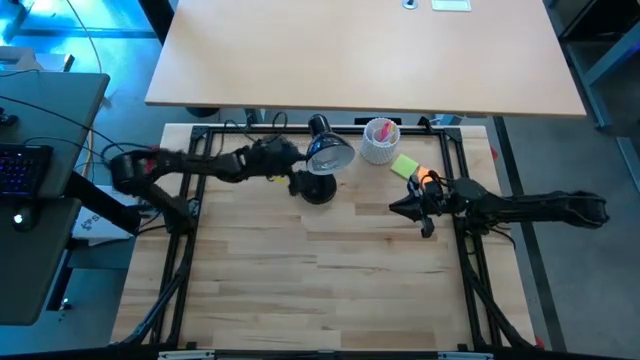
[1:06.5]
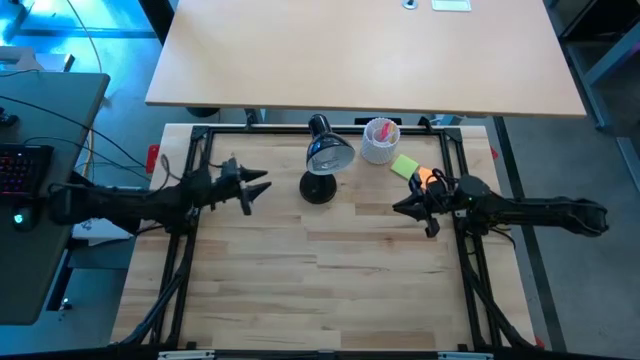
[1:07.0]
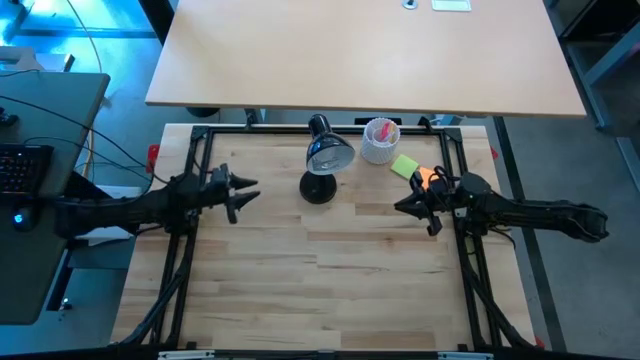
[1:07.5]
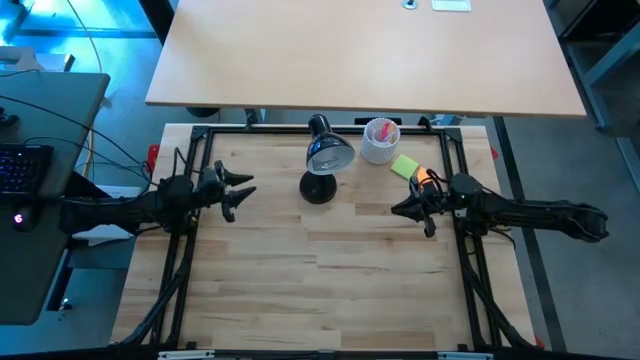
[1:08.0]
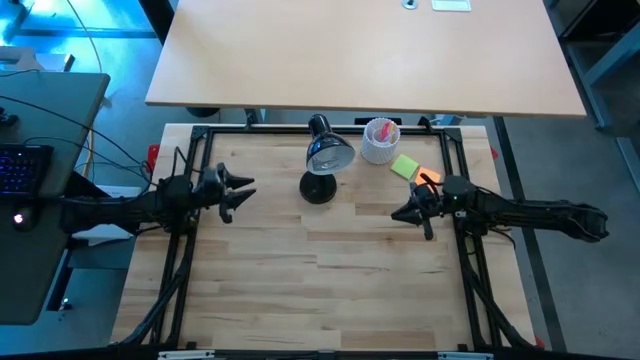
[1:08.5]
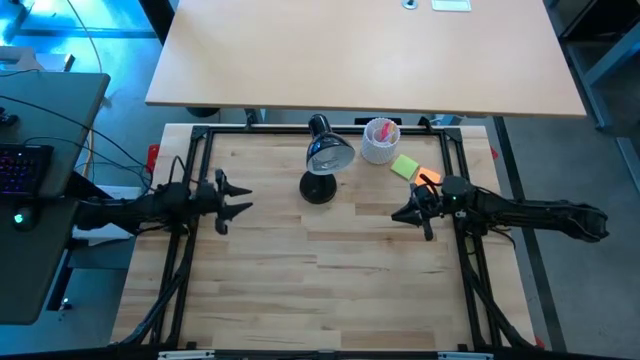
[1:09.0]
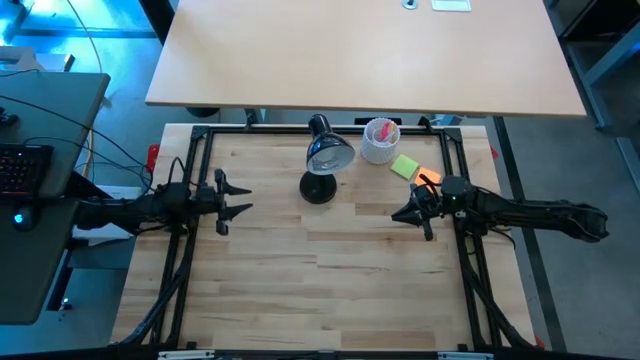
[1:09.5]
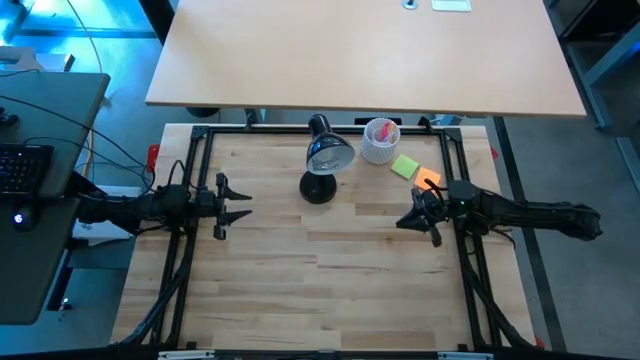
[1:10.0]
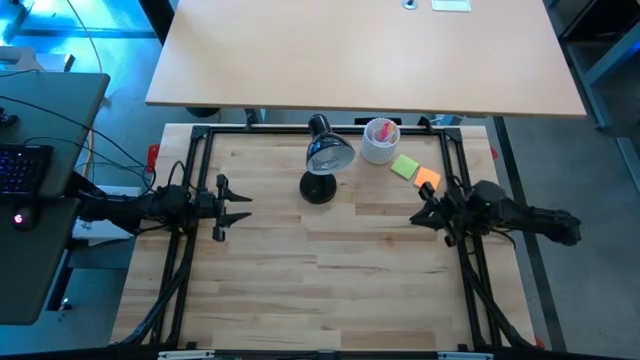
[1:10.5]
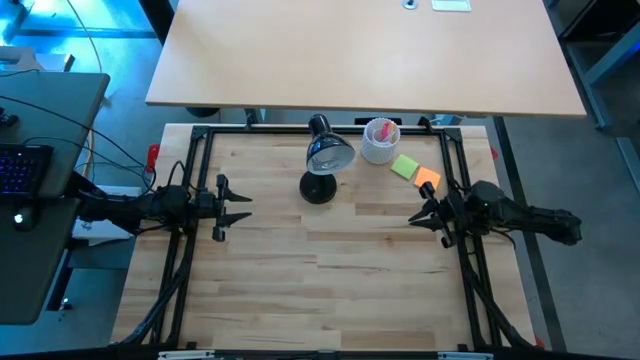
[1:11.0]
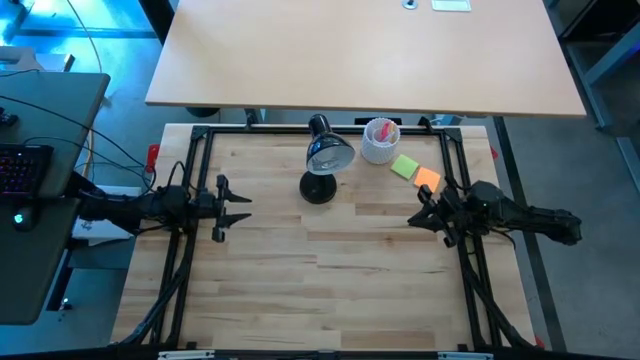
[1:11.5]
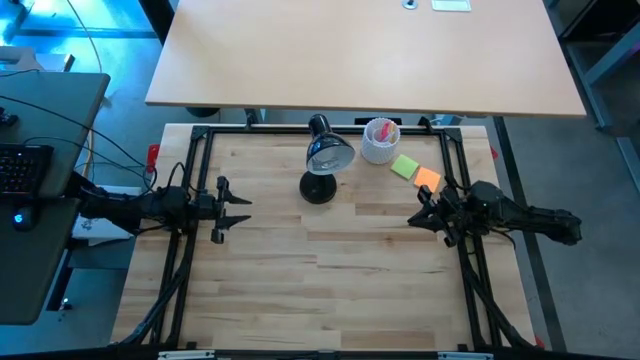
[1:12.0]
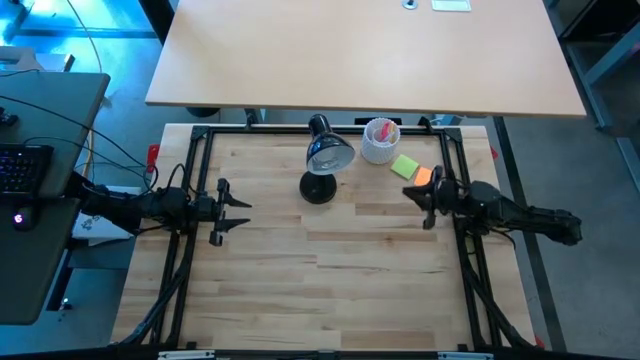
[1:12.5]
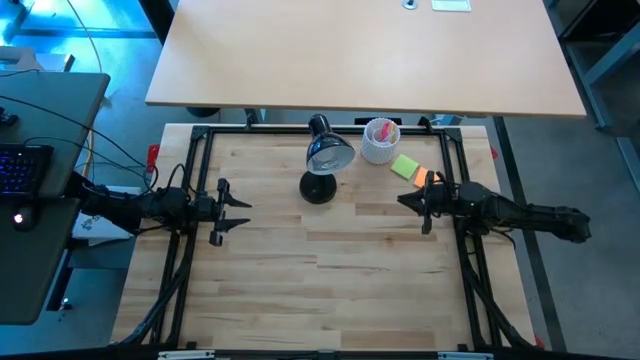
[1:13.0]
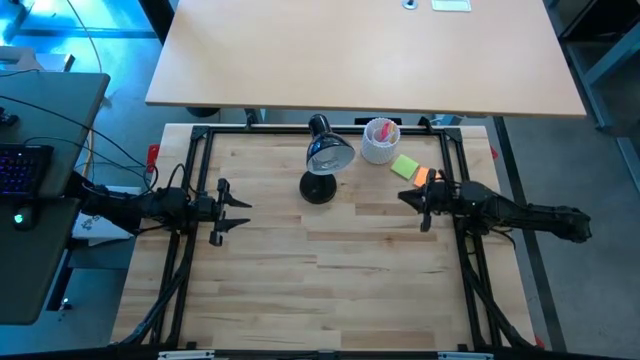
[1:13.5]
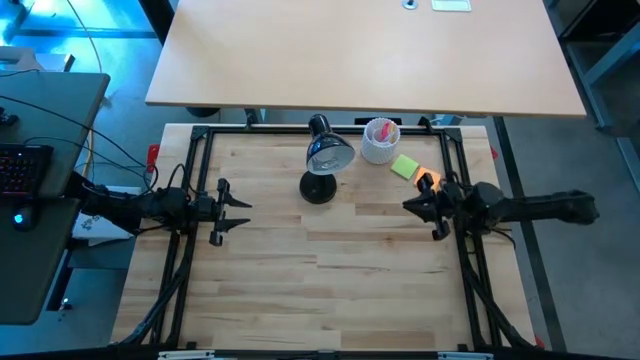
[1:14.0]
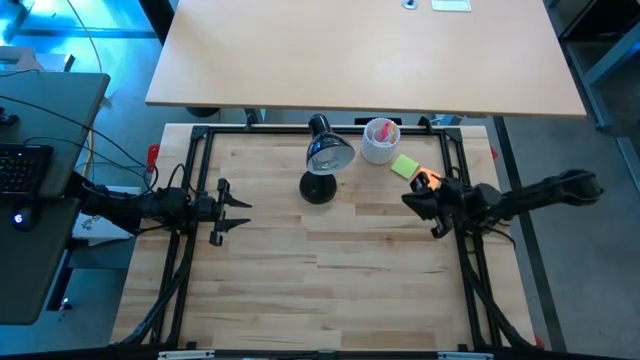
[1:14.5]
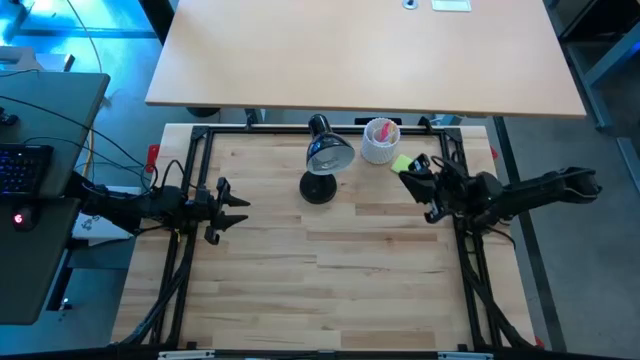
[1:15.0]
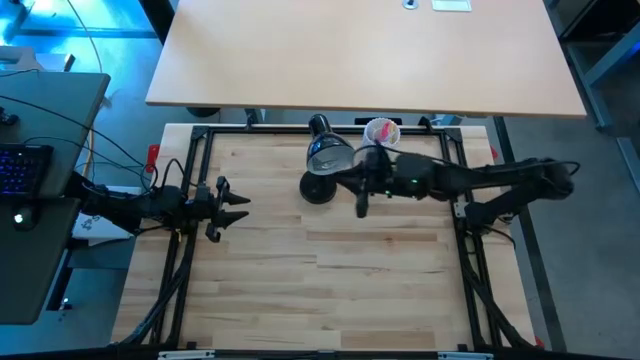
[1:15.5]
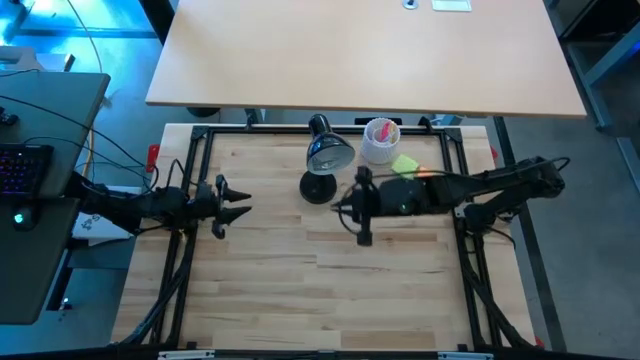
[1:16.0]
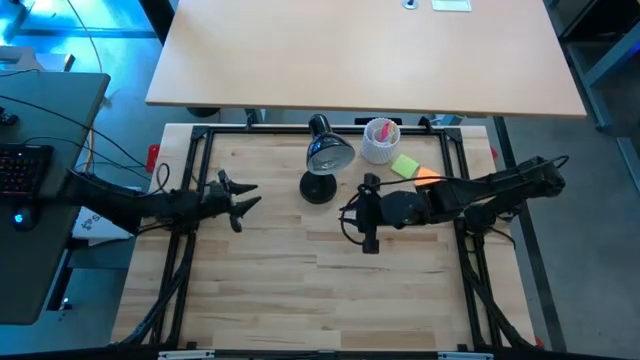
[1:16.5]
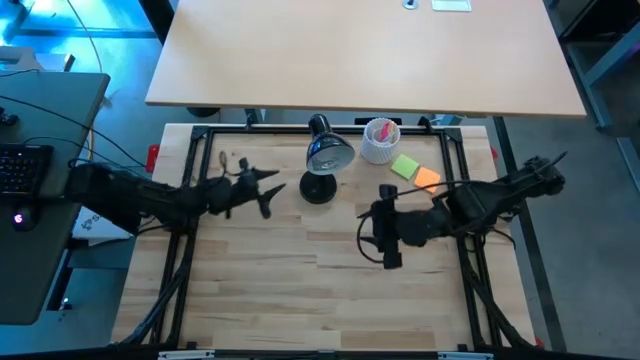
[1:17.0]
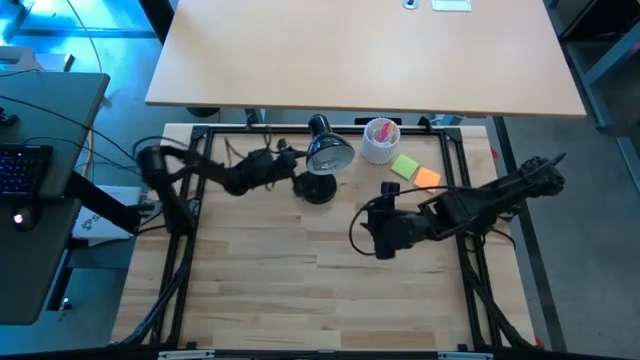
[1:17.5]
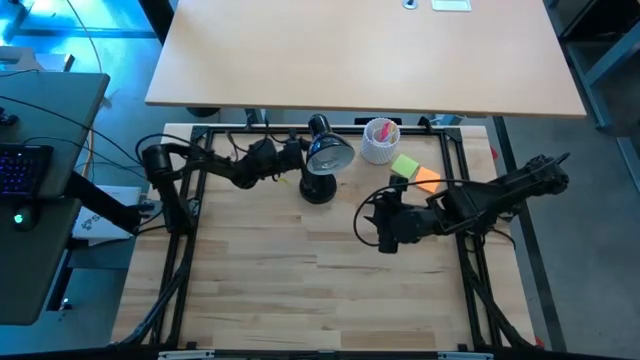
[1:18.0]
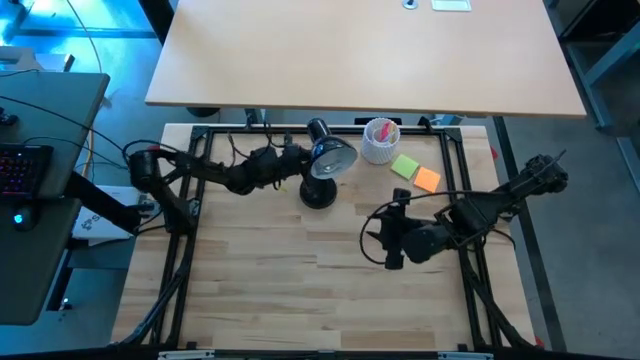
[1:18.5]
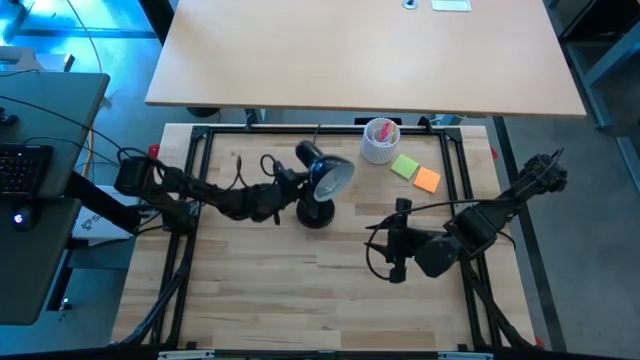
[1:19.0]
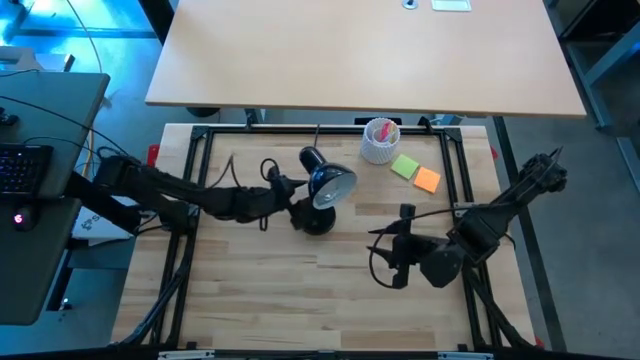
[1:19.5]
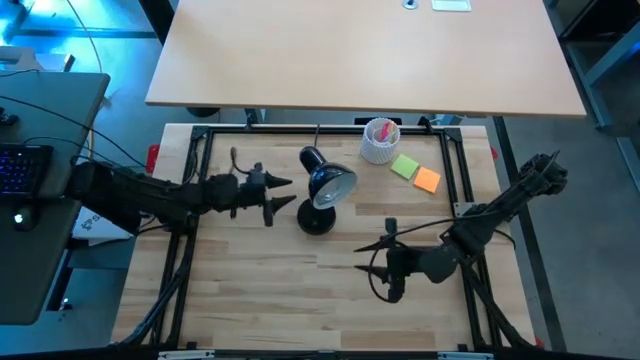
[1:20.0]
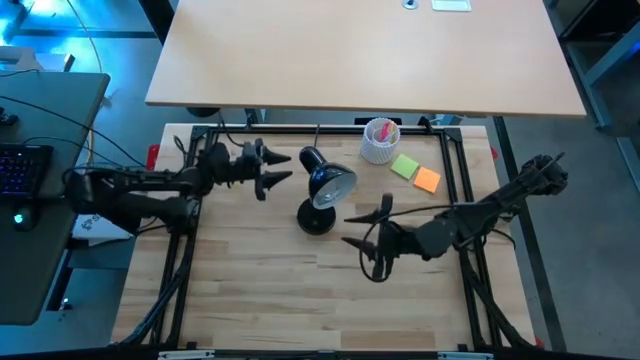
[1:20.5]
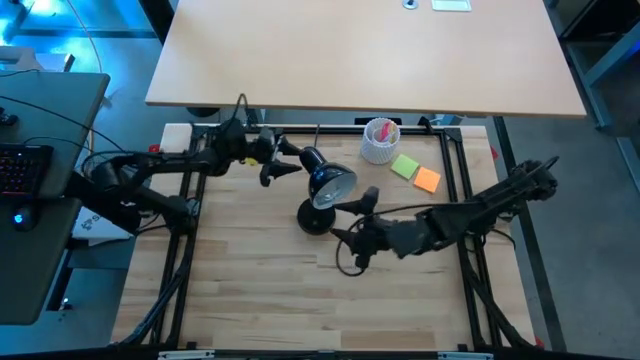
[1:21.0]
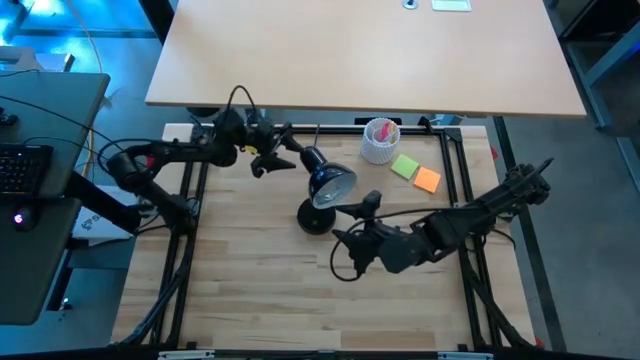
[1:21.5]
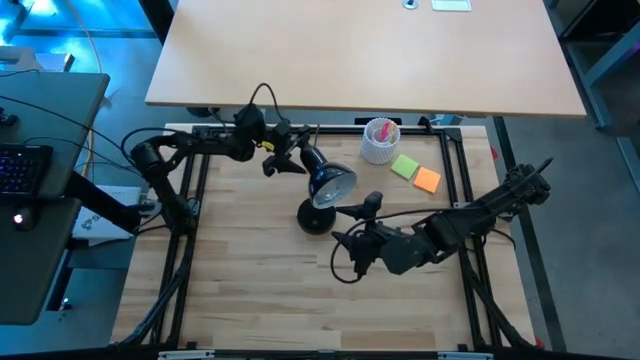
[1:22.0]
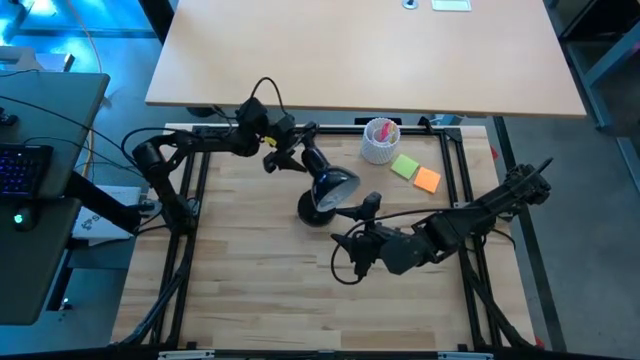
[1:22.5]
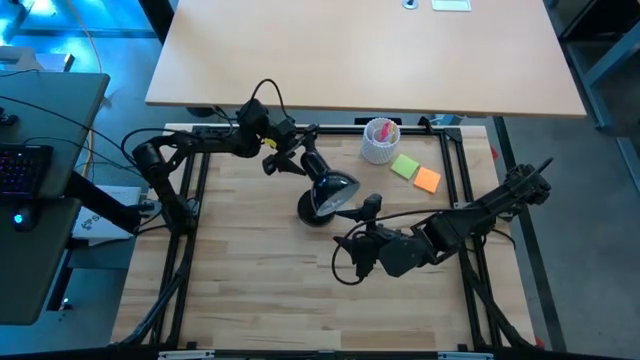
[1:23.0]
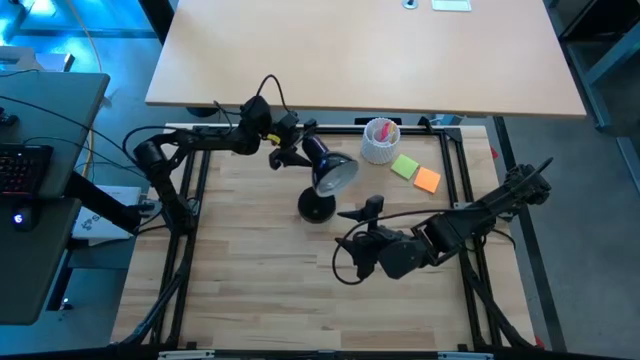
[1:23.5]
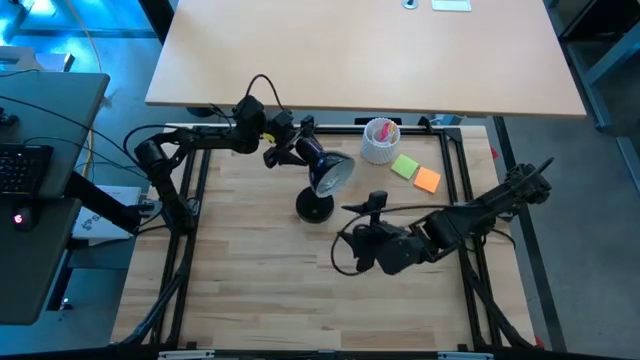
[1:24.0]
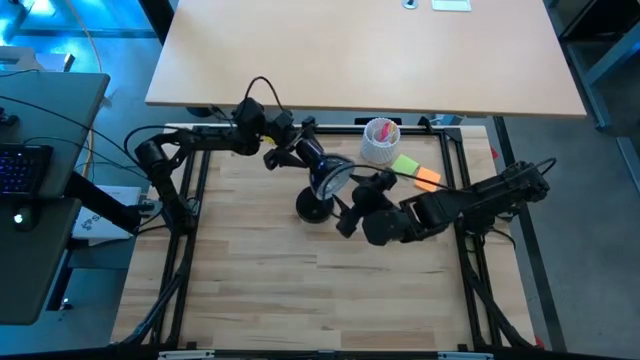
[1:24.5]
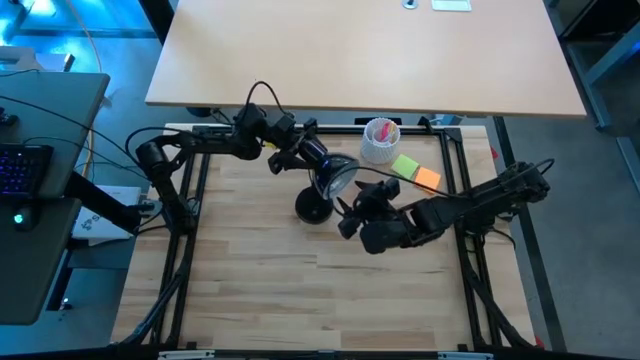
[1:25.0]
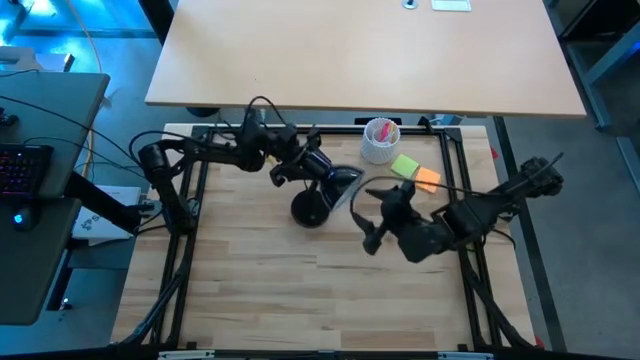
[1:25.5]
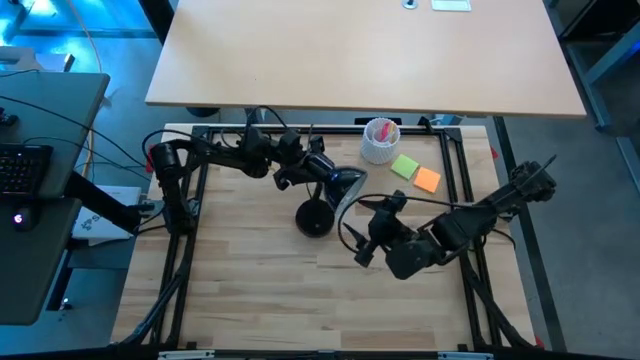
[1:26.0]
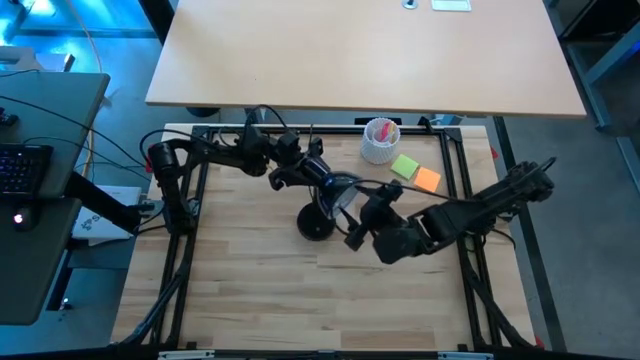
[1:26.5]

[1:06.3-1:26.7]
Task: Screw lightbulb
Remove the lightbulb from the desk lamp
